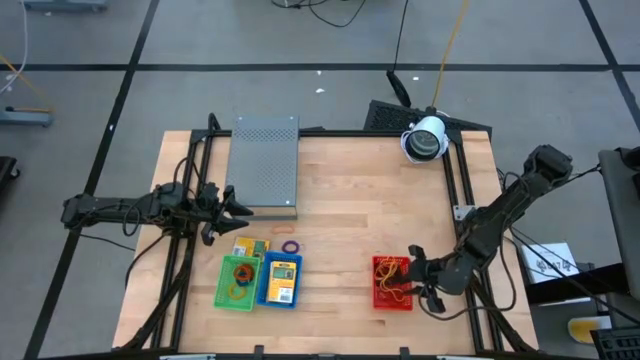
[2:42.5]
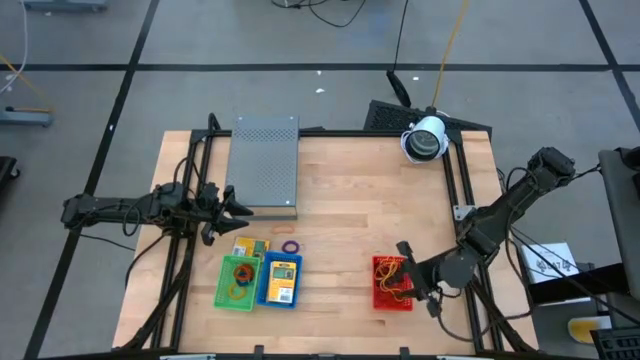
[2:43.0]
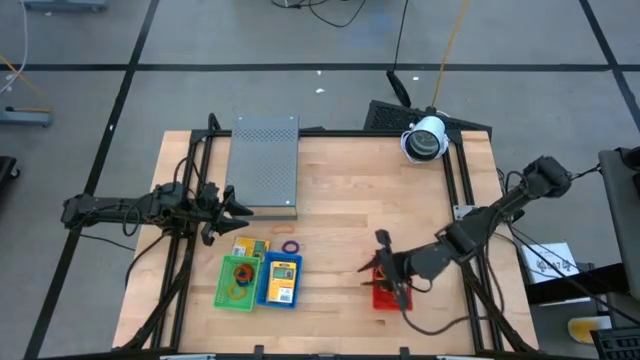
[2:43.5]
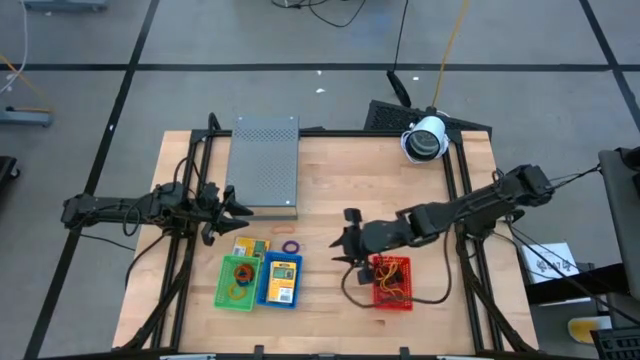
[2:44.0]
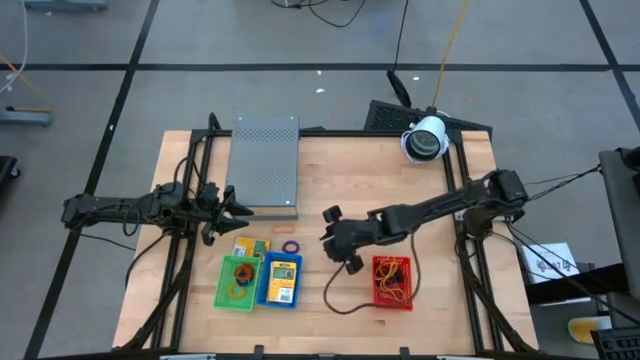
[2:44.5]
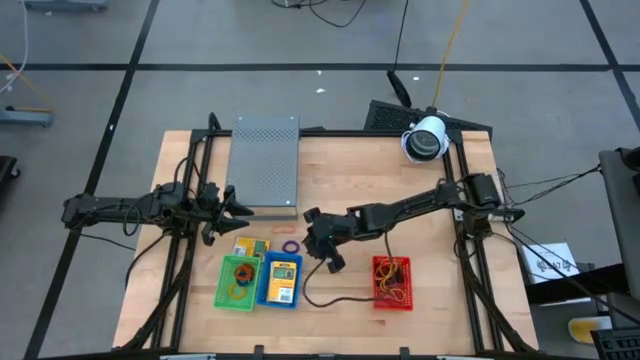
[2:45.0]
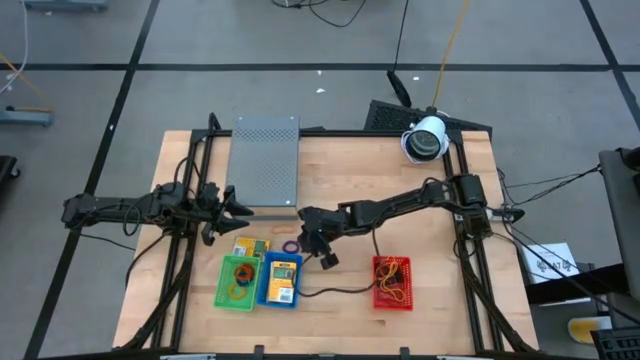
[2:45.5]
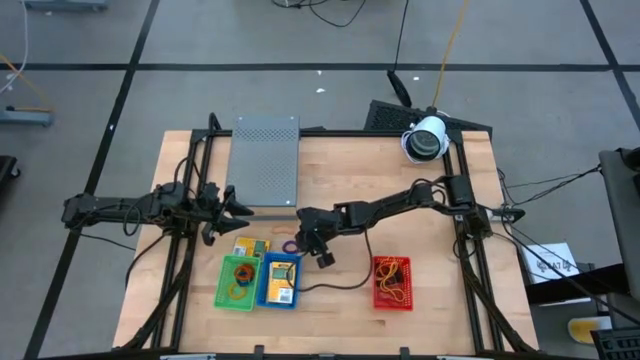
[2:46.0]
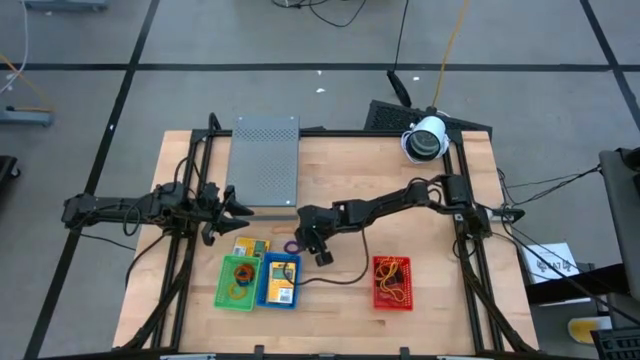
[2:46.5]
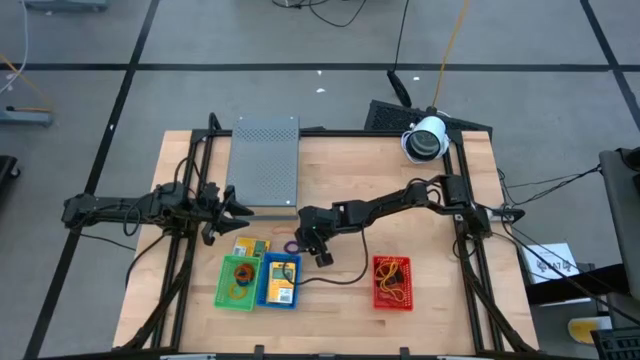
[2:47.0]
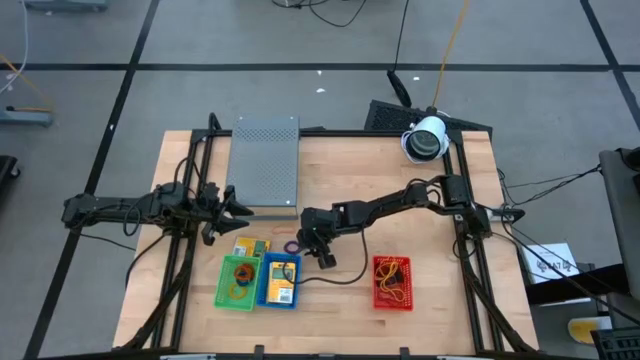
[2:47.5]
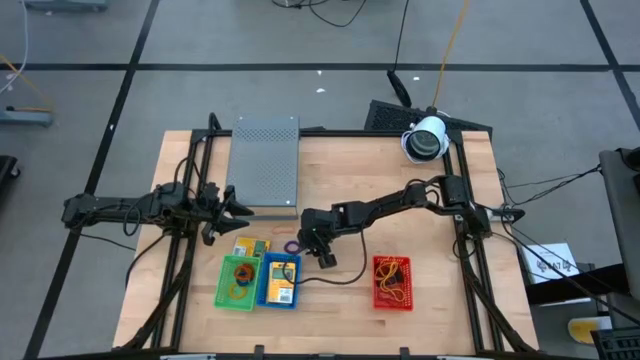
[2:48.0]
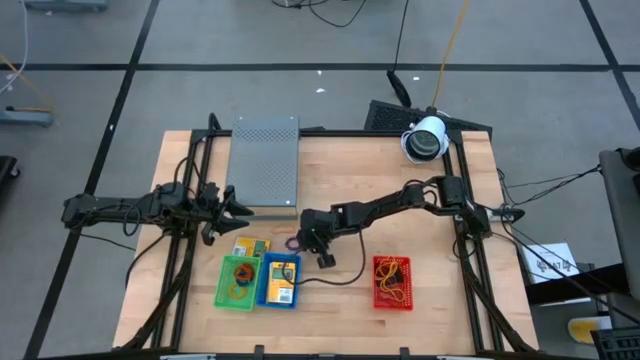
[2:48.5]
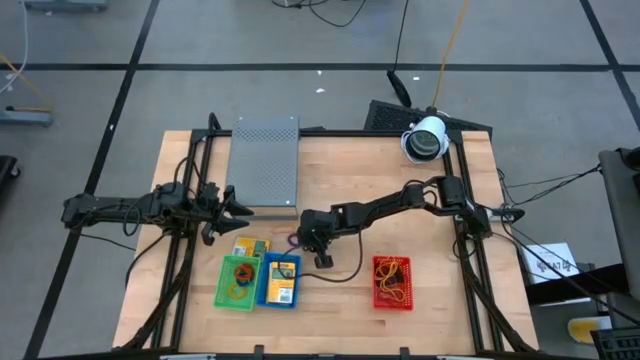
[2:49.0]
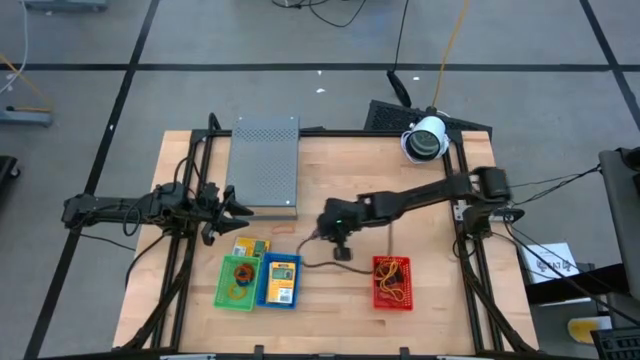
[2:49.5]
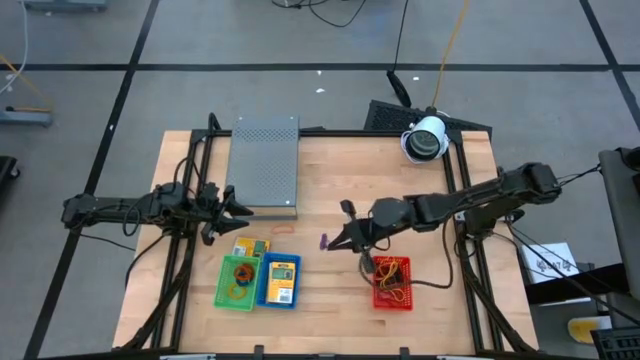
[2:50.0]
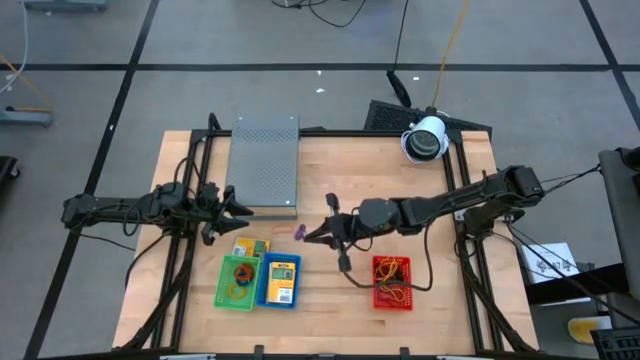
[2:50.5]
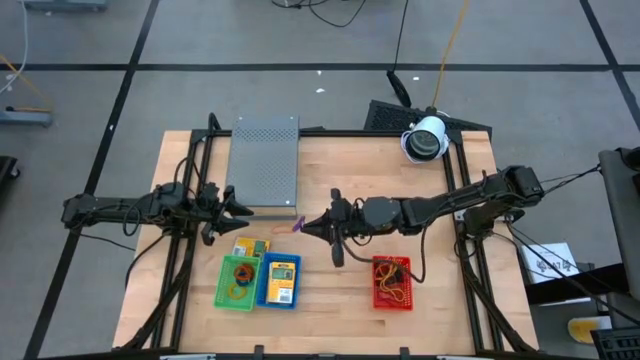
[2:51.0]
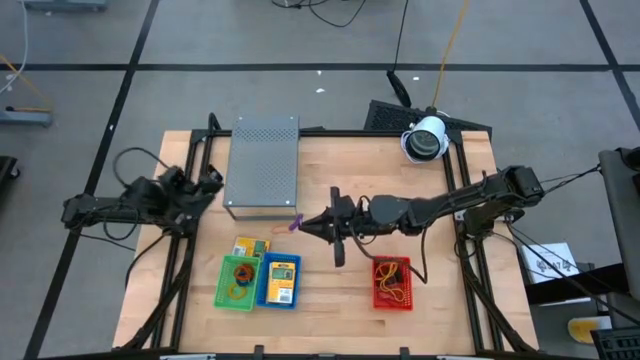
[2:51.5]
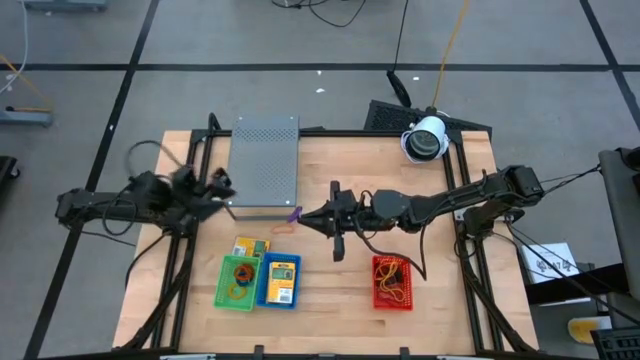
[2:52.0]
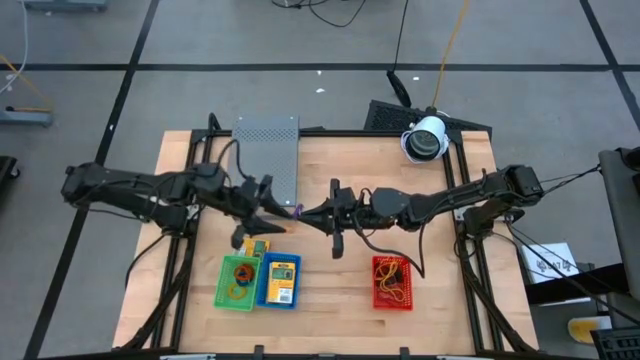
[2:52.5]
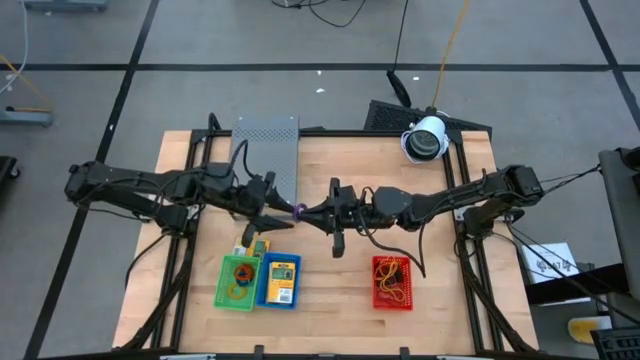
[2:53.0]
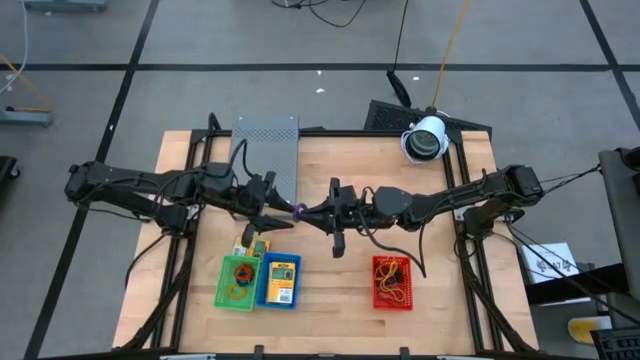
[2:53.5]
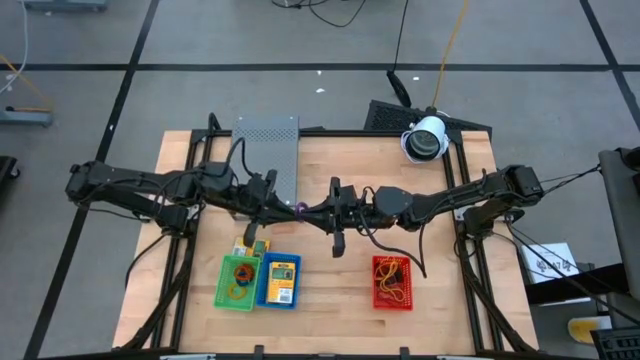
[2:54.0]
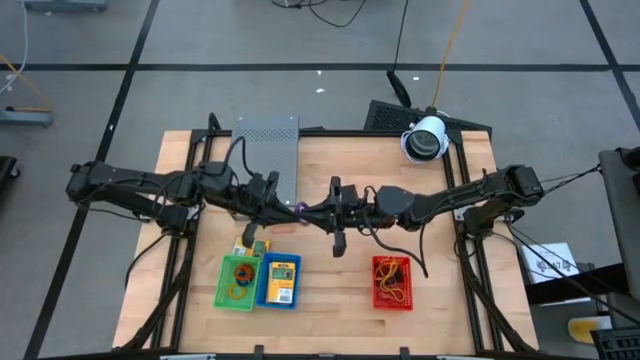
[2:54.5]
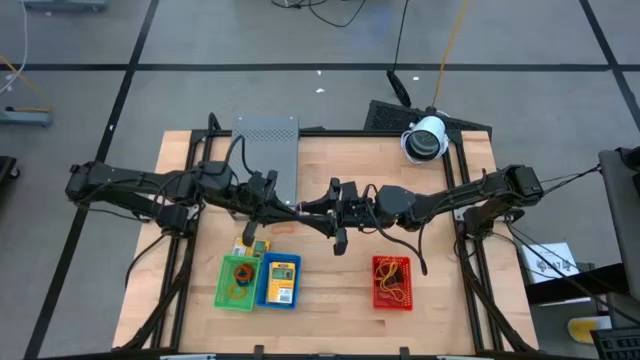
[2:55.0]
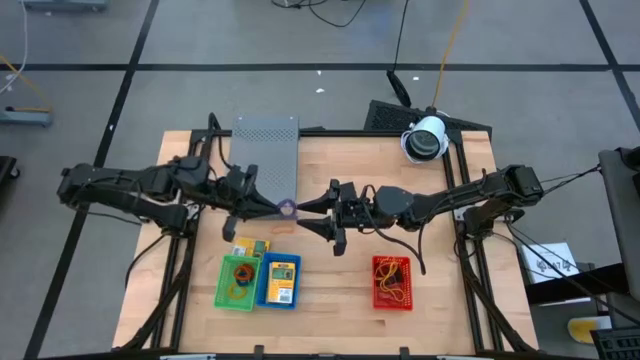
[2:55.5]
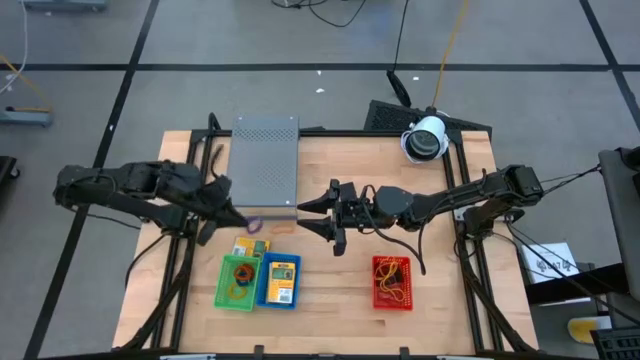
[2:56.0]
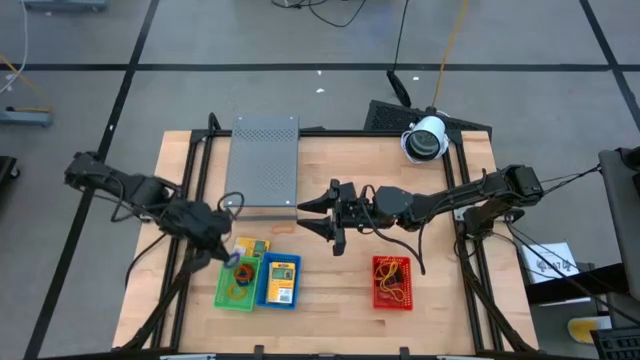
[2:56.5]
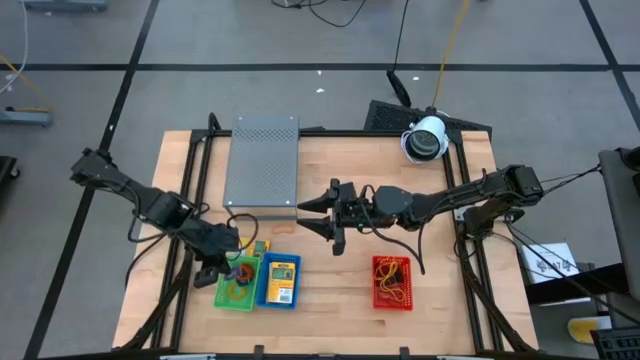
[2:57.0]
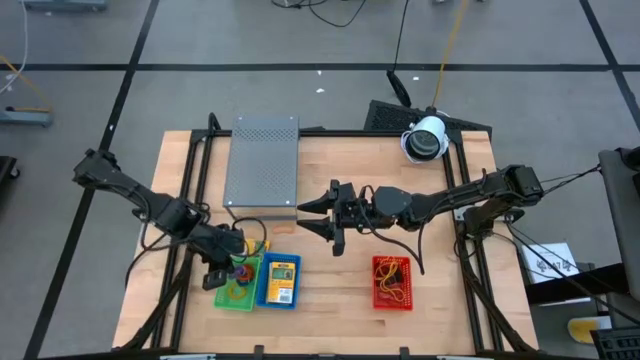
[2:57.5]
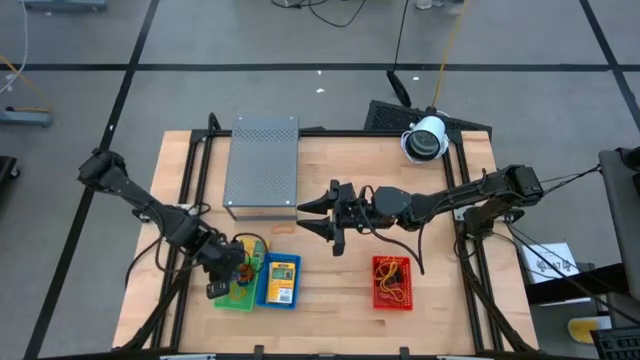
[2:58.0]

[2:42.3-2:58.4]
Task: Pick & Place Office Desk Supplies
Put the purple spring rubberband into the green bin

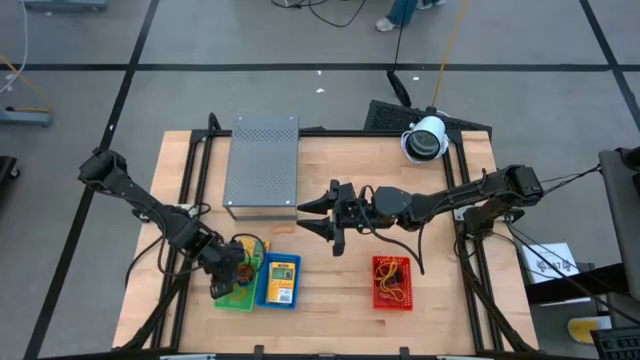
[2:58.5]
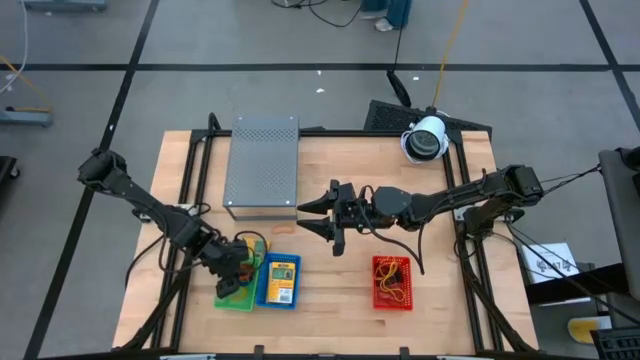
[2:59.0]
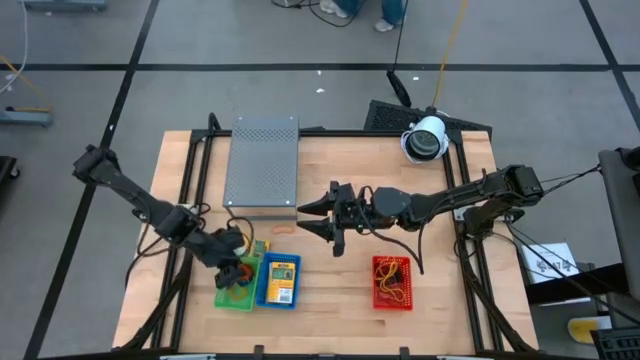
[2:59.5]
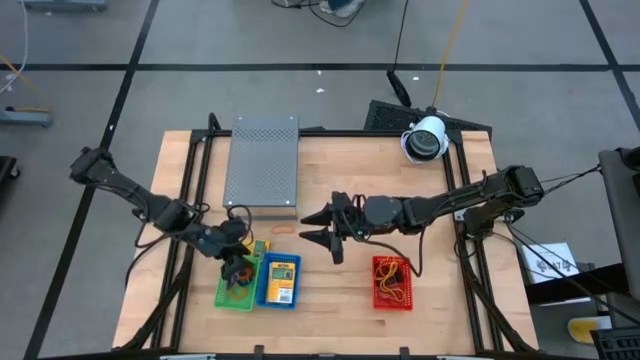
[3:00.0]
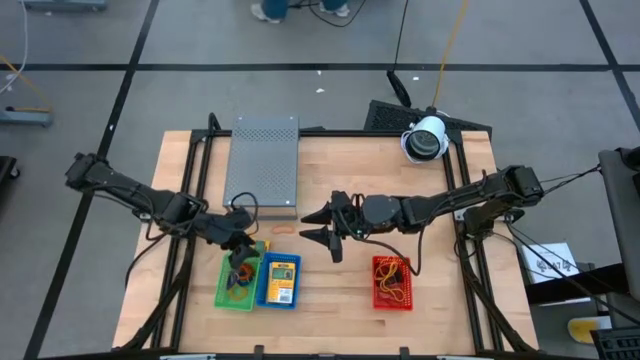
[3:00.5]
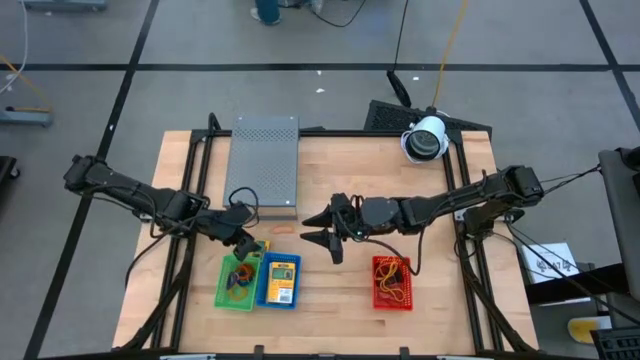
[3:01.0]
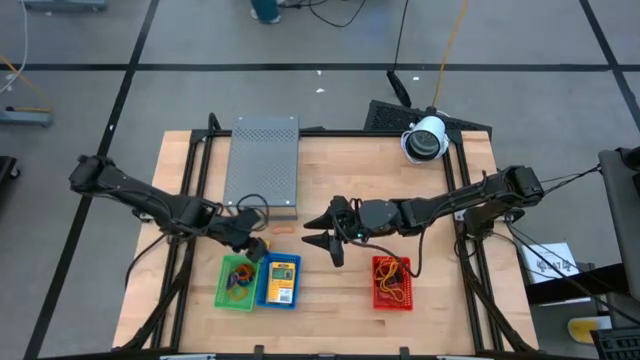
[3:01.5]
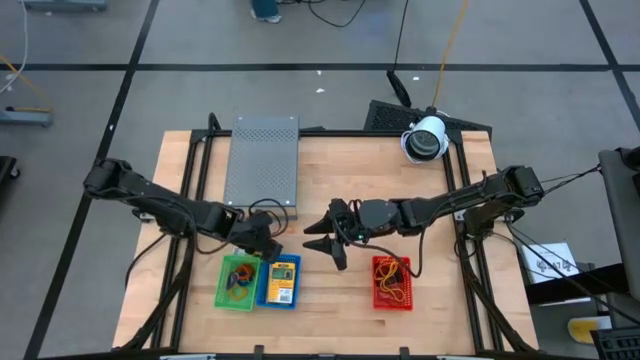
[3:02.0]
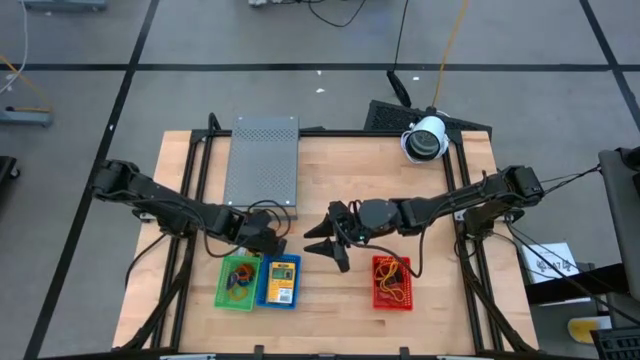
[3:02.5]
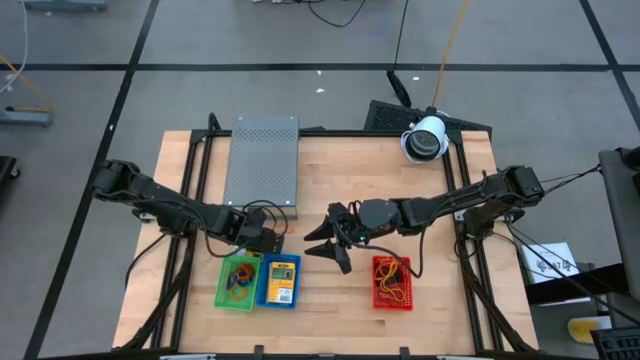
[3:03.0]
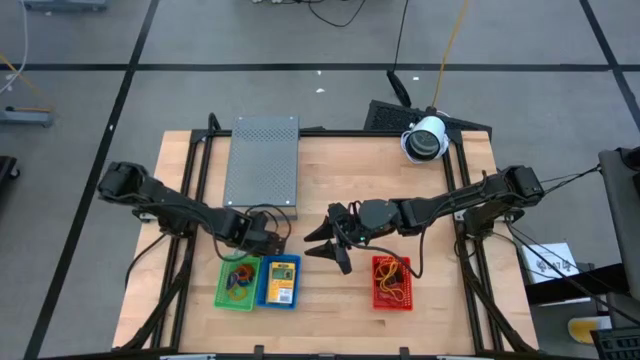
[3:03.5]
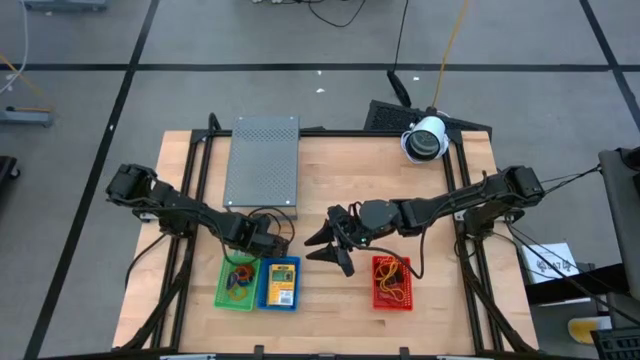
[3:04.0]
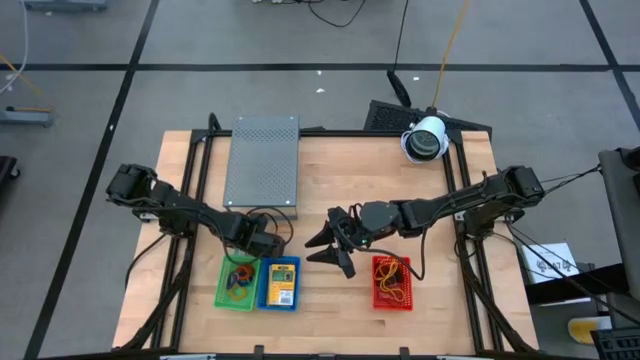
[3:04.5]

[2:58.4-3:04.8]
Put the crayon into the blue bin
